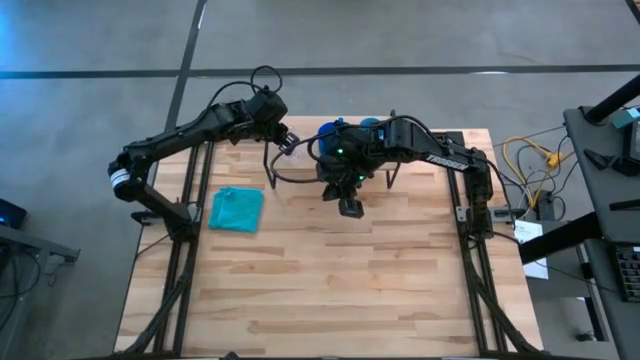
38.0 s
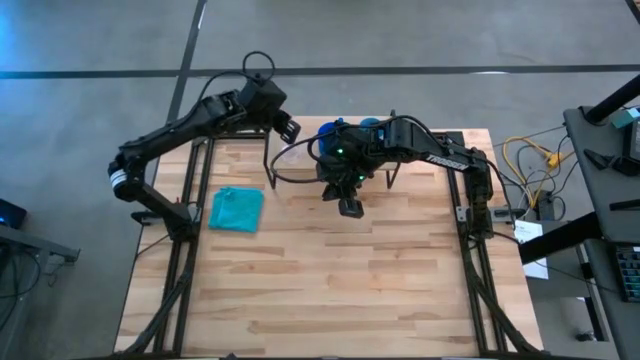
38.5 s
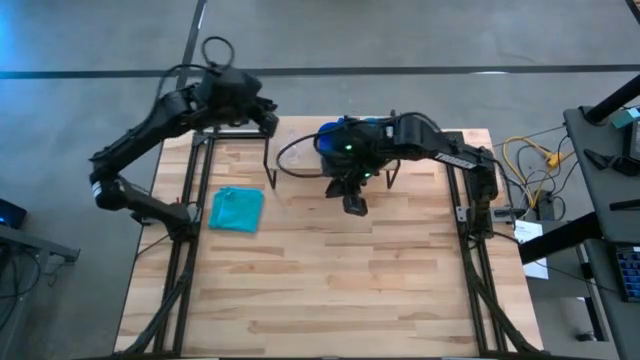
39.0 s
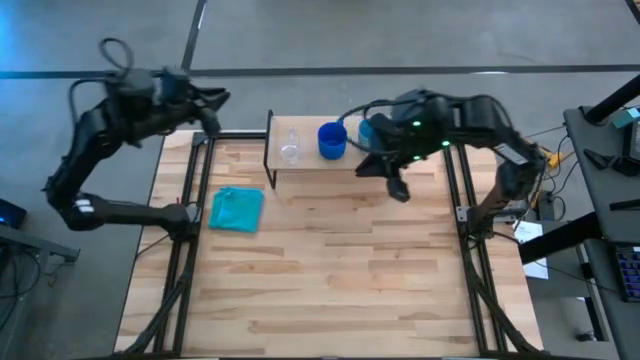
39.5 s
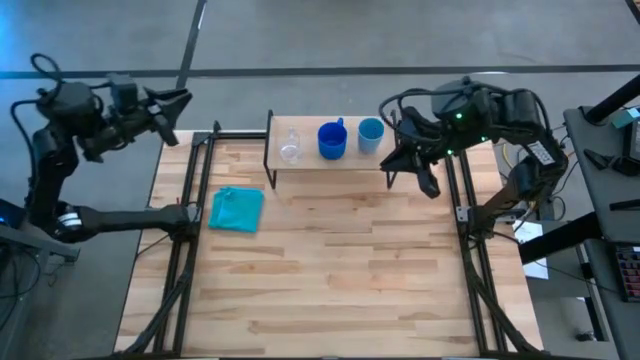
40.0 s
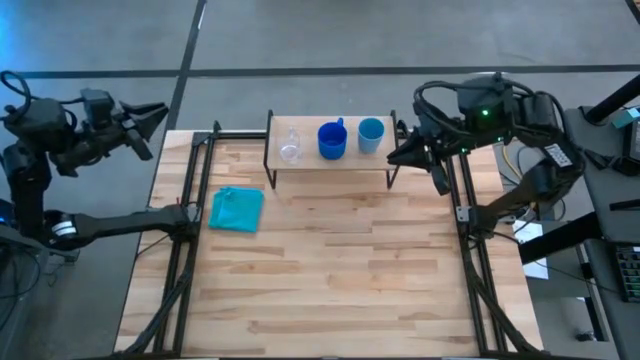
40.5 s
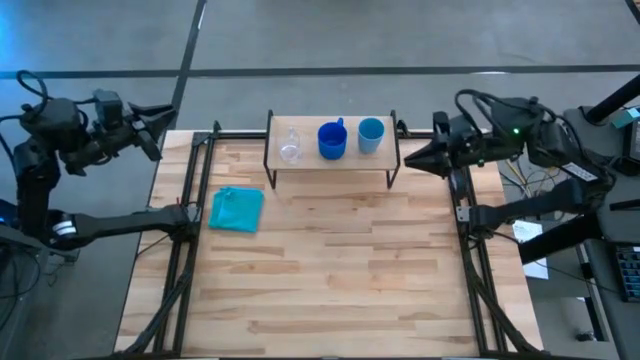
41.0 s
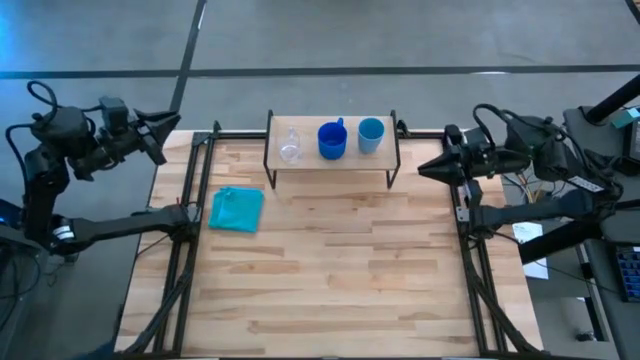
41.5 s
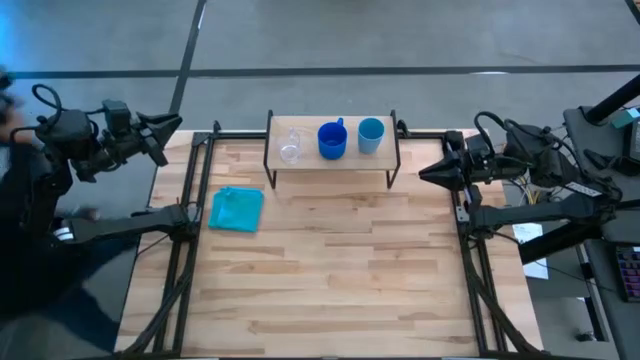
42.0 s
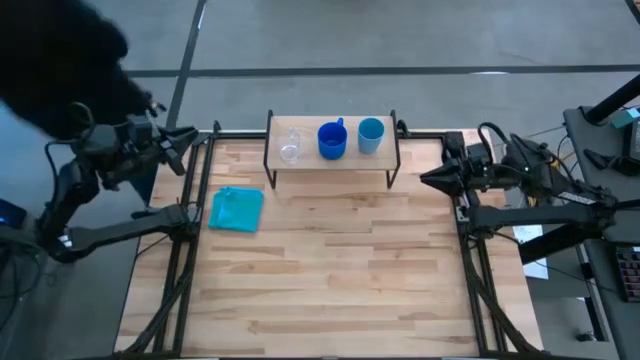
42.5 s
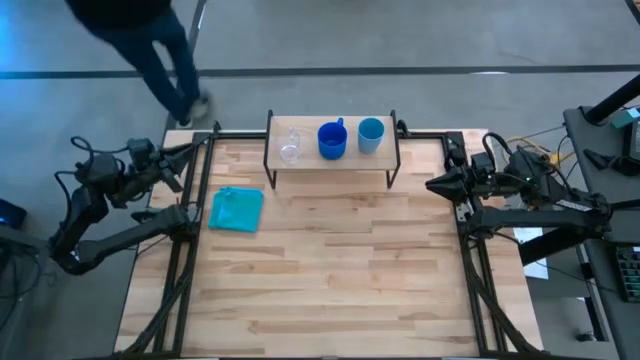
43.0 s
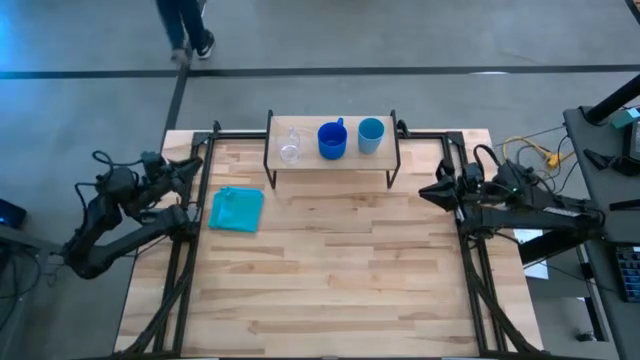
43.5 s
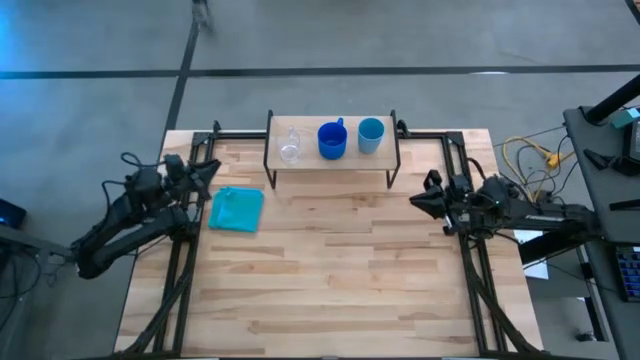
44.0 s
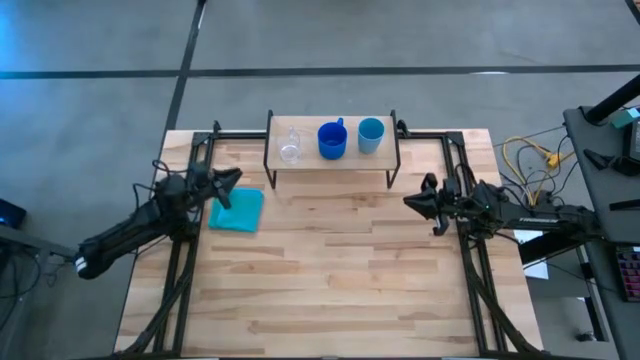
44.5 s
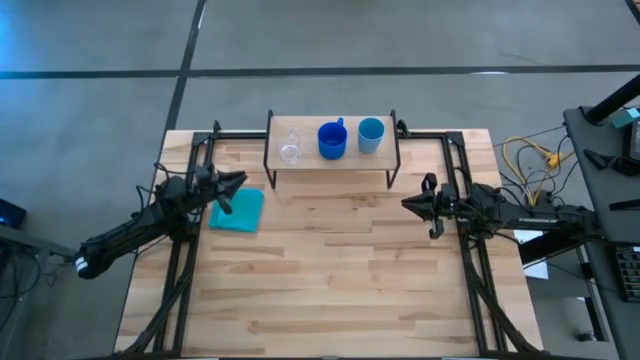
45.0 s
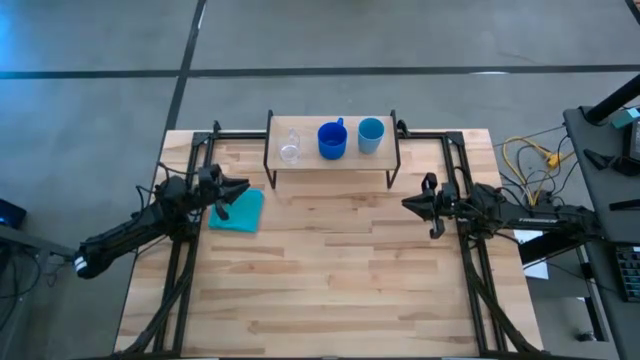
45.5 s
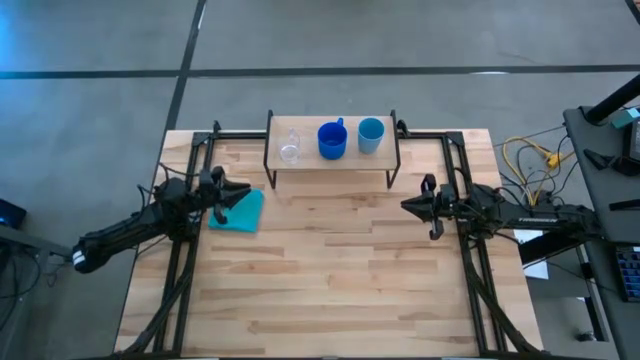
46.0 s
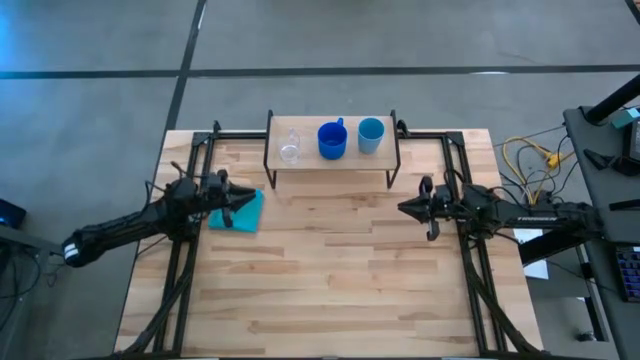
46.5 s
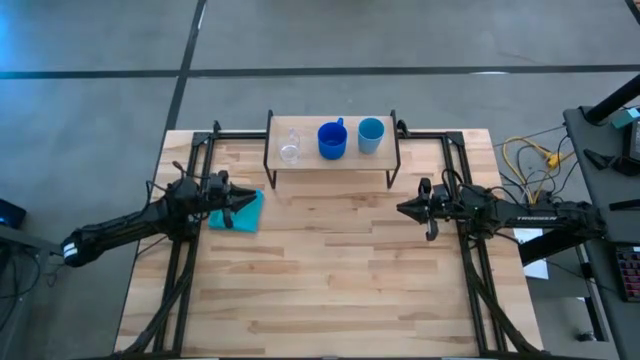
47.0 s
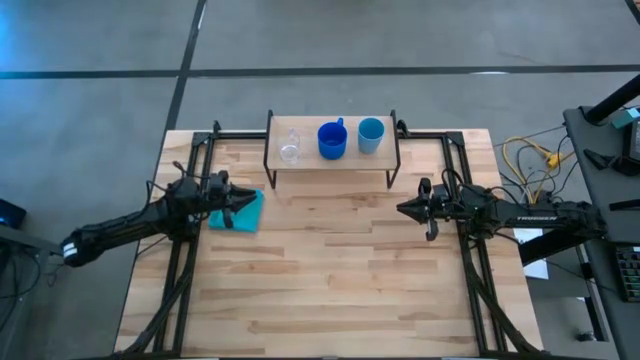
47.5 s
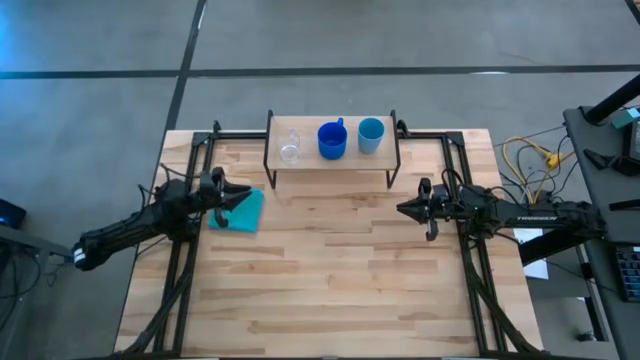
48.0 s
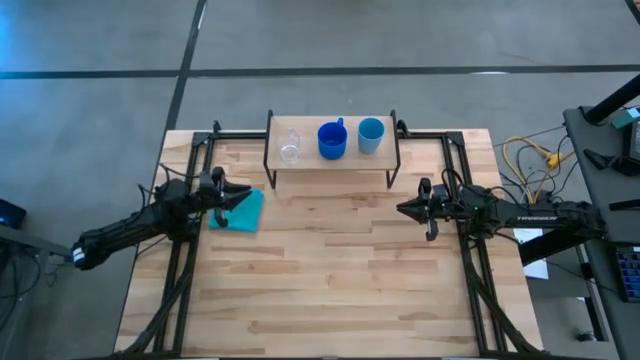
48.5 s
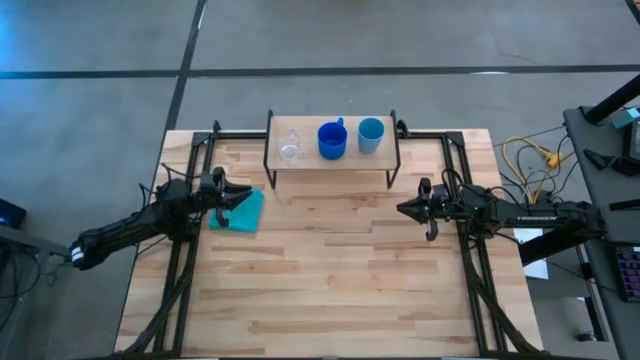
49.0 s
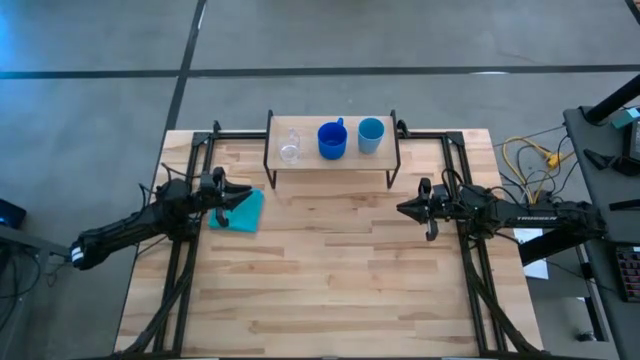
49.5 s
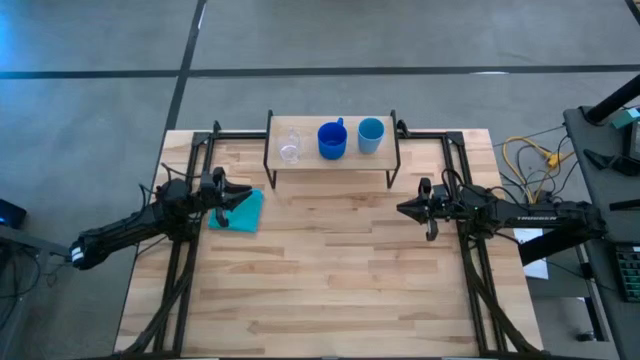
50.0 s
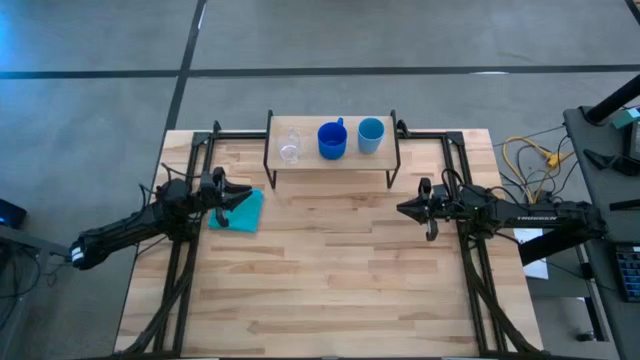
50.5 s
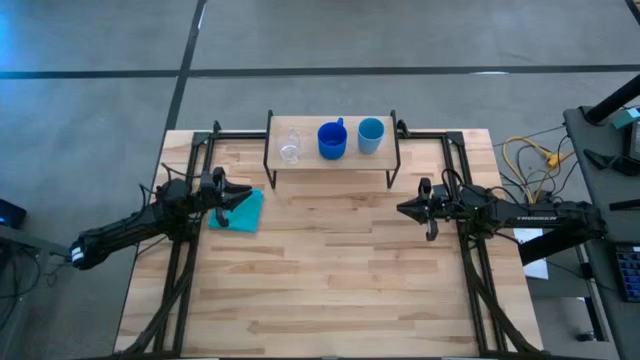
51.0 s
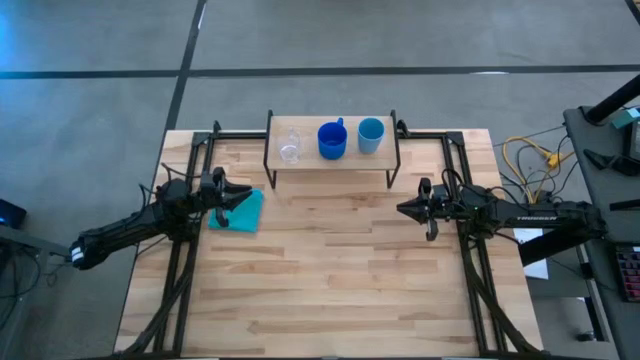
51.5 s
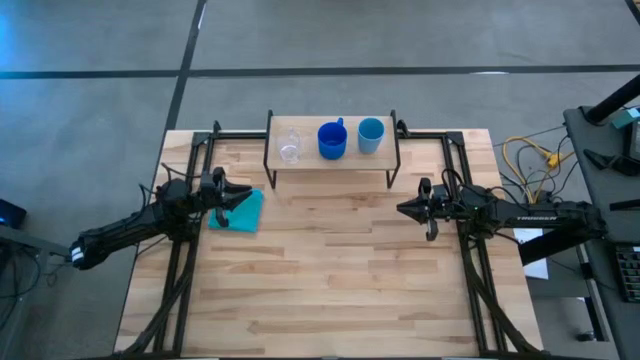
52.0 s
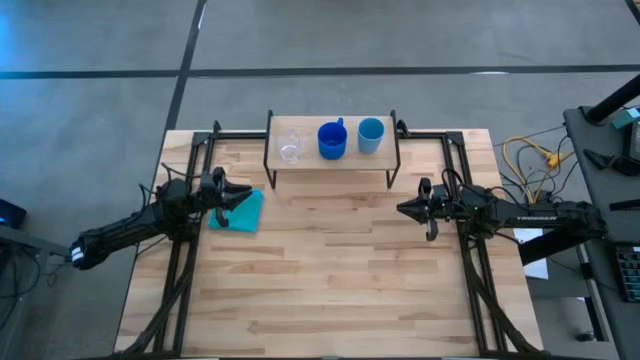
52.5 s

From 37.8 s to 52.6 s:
Task: Stack small to large cups/mugs on shelf
Return to Home Position

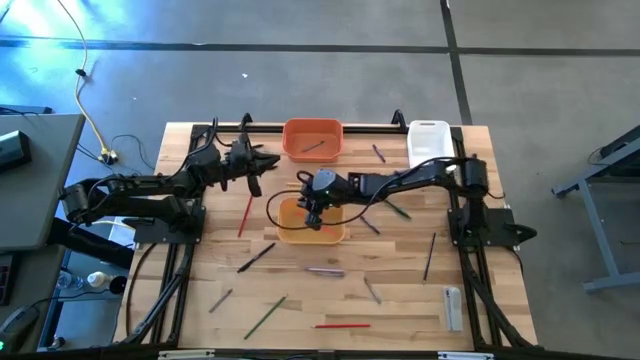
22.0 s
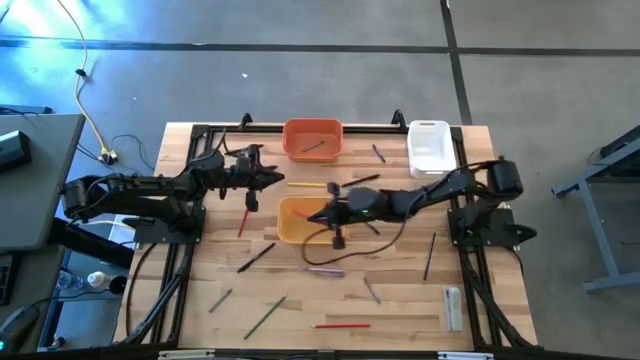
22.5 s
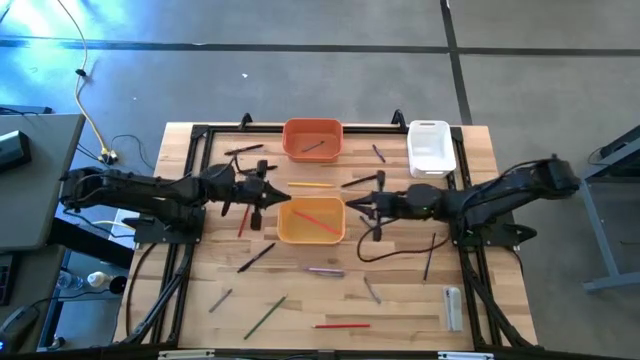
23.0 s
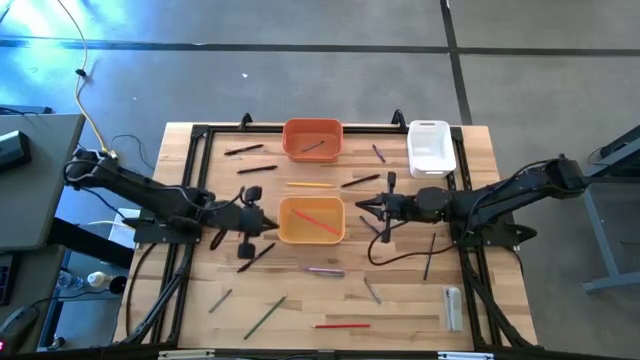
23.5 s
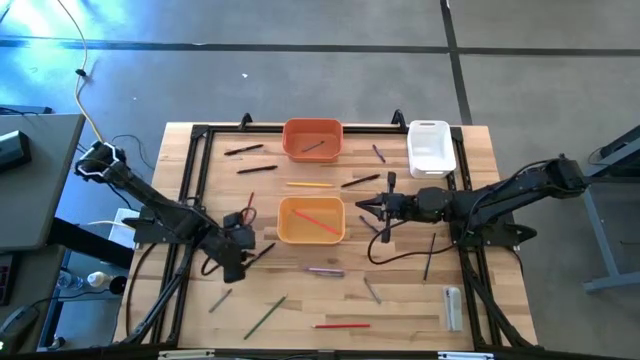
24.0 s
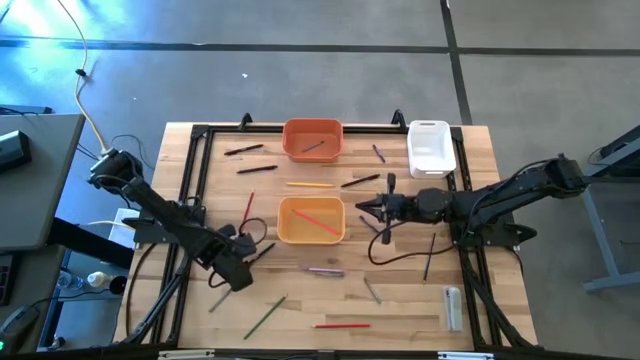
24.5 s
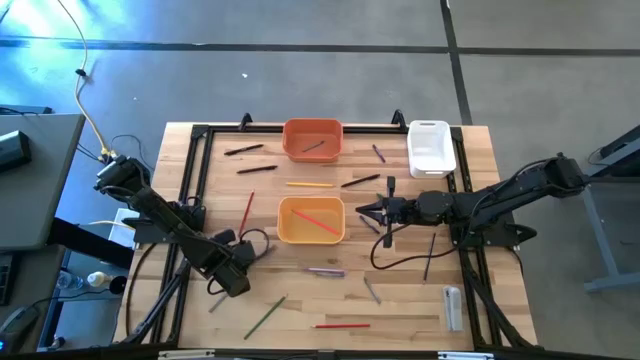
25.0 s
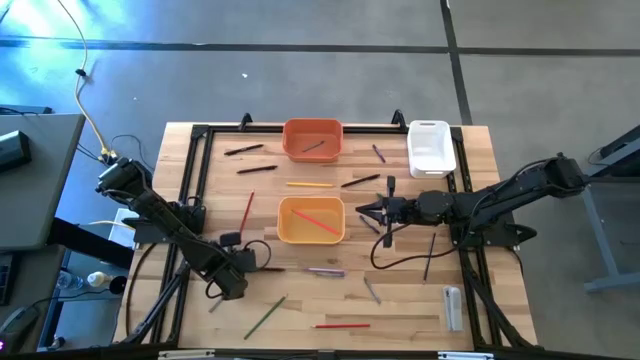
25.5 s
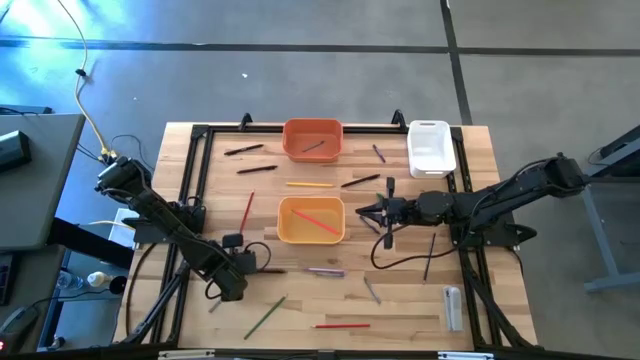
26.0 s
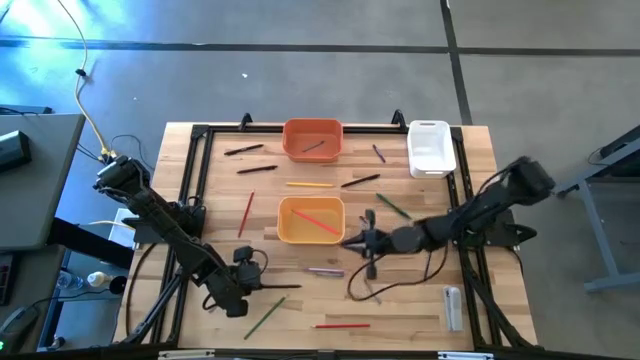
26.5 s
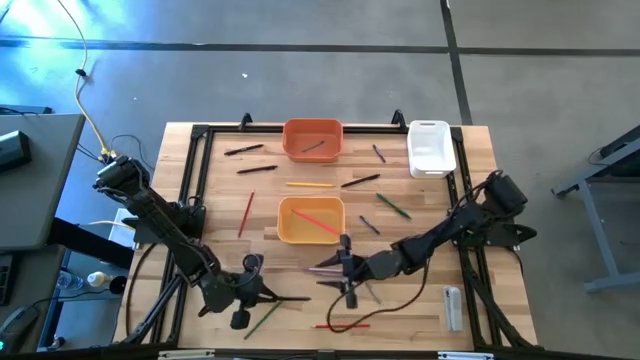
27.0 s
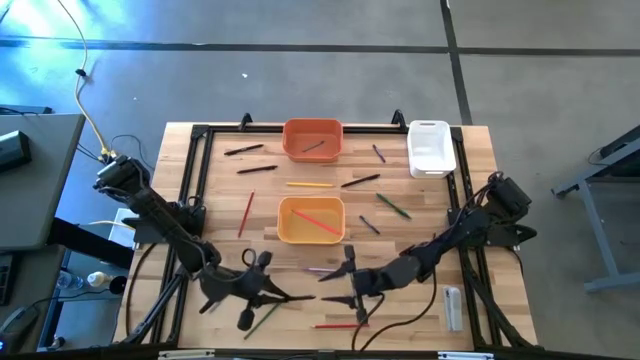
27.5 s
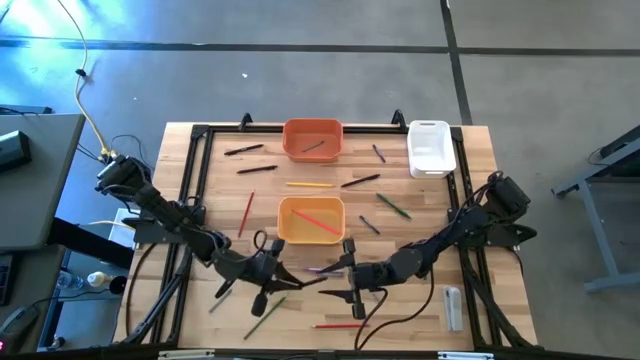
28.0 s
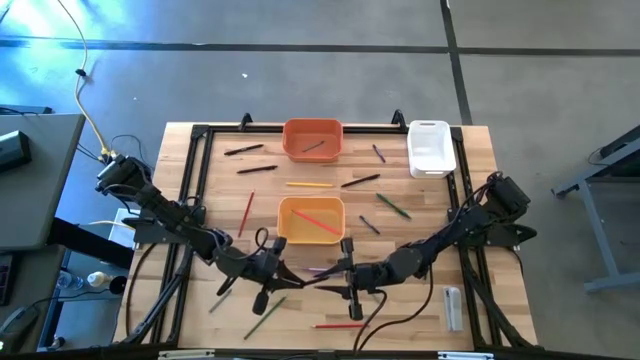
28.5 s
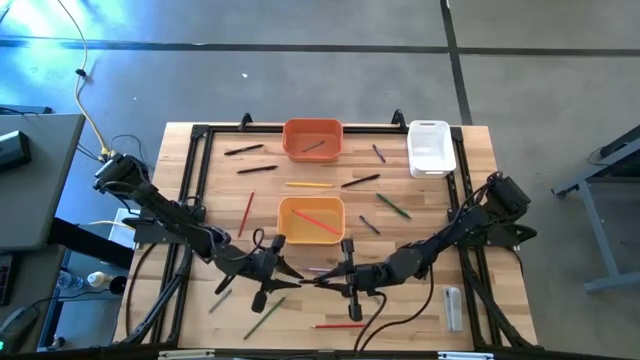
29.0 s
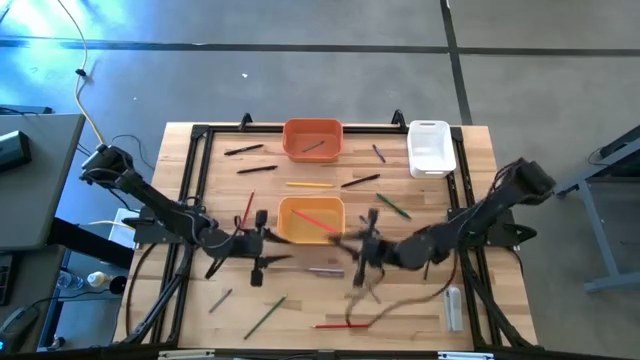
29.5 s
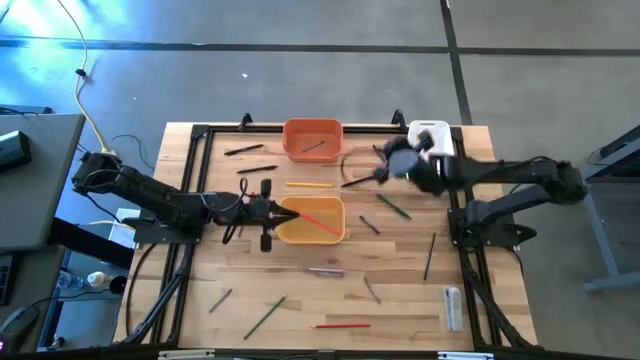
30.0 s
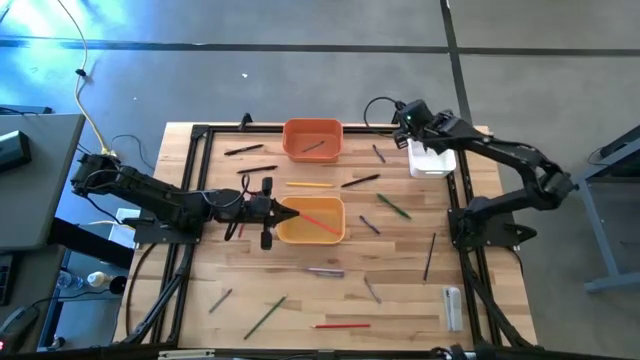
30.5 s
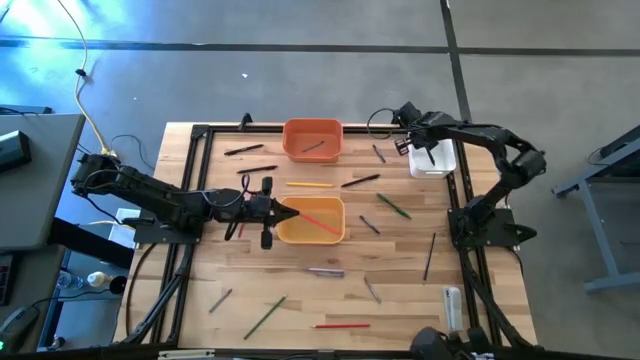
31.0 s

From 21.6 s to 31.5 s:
Task: Sort crayons/erasers/pens/pencils in bins
Put the bottom black pen into the white bin
